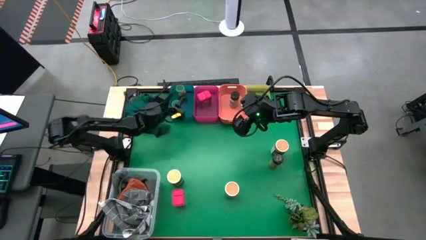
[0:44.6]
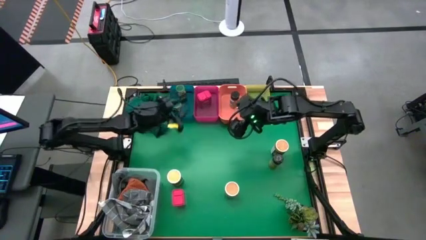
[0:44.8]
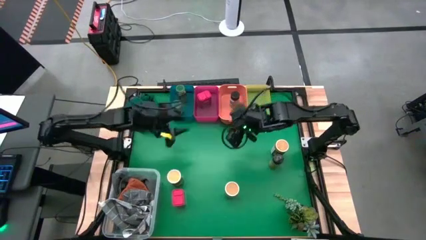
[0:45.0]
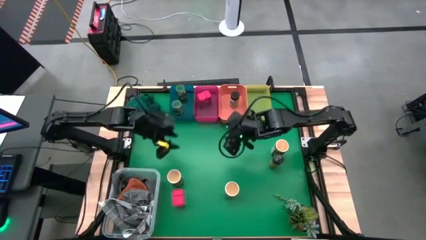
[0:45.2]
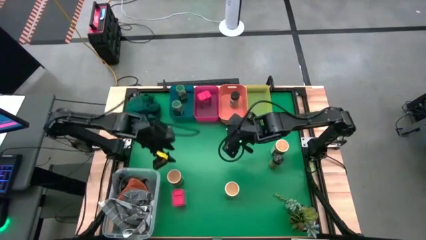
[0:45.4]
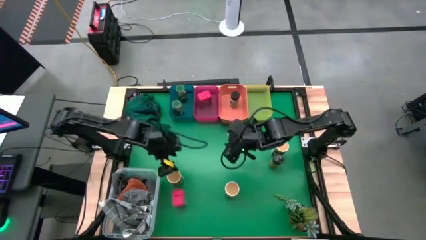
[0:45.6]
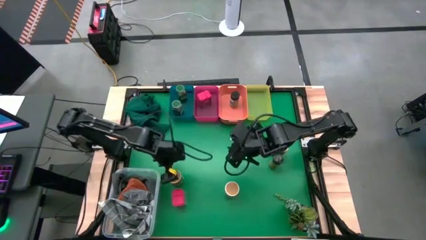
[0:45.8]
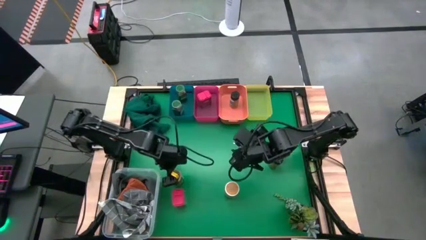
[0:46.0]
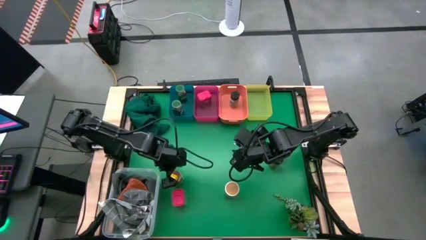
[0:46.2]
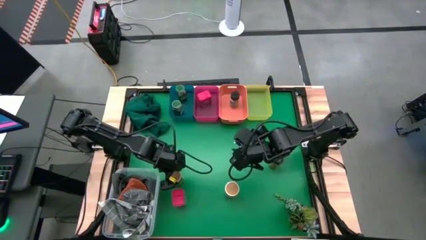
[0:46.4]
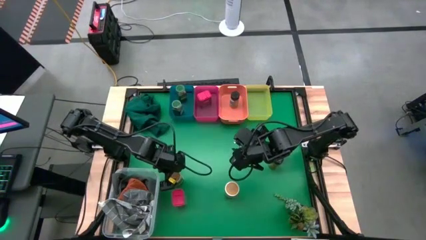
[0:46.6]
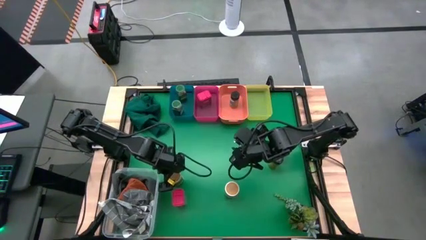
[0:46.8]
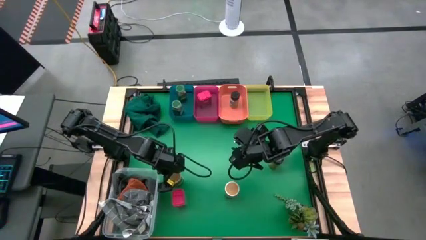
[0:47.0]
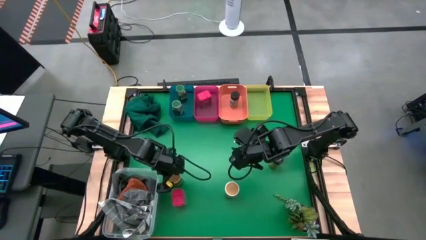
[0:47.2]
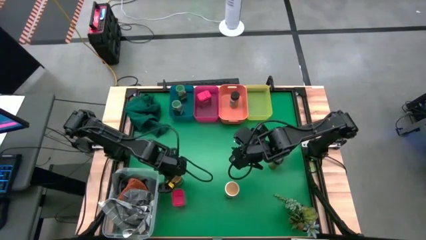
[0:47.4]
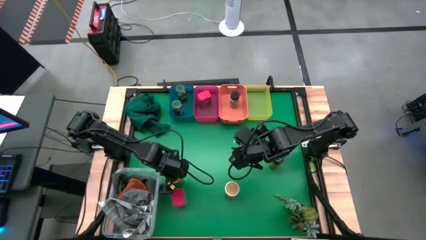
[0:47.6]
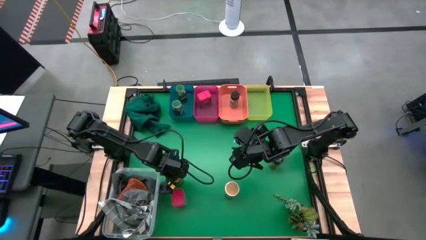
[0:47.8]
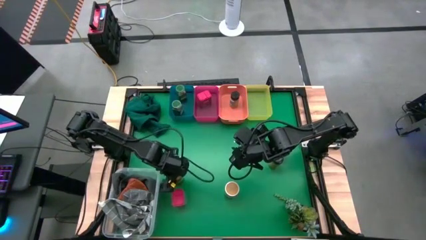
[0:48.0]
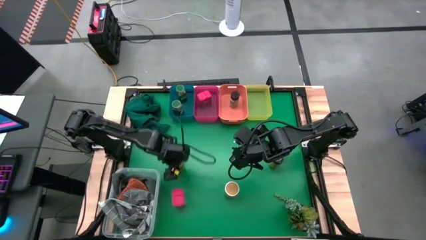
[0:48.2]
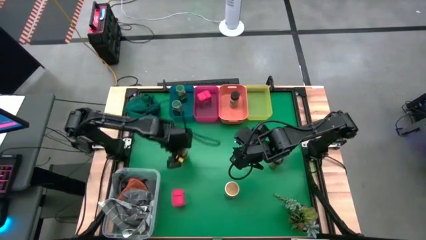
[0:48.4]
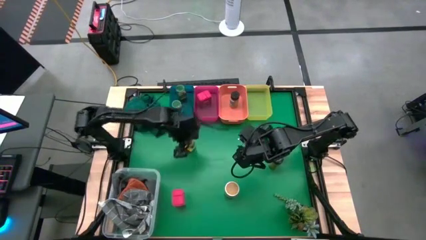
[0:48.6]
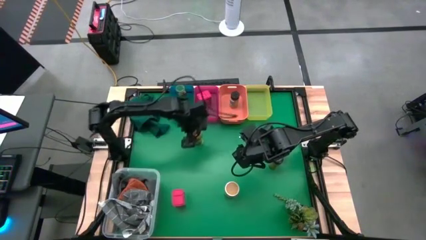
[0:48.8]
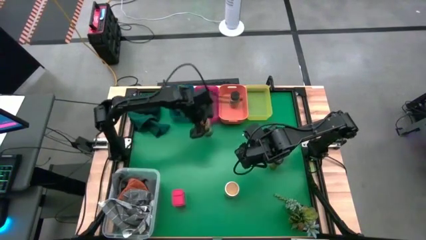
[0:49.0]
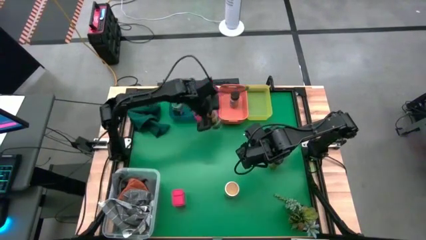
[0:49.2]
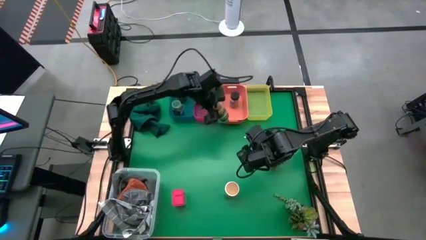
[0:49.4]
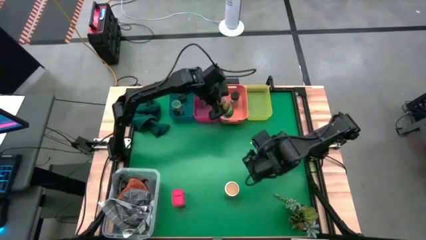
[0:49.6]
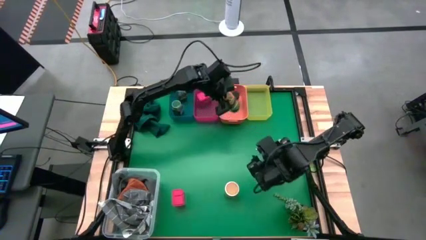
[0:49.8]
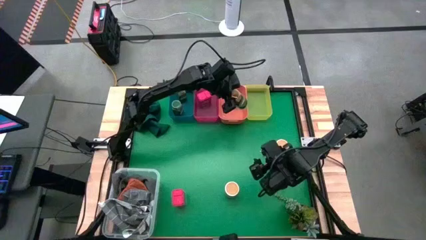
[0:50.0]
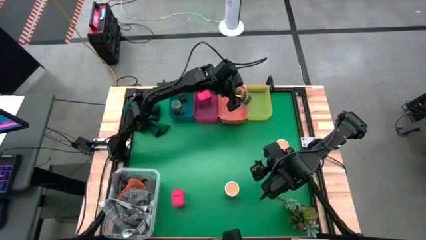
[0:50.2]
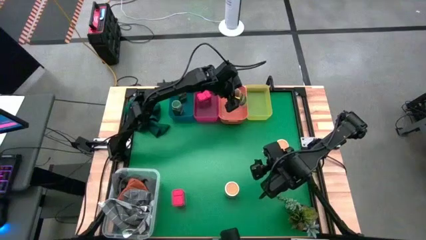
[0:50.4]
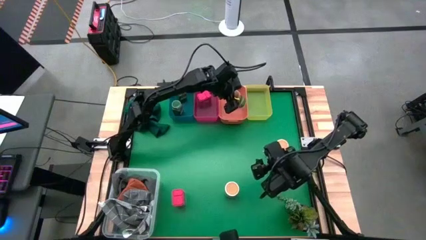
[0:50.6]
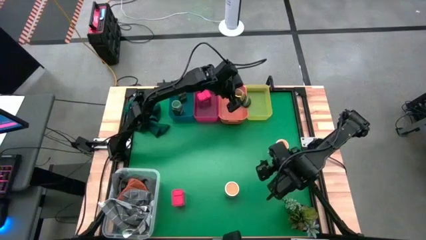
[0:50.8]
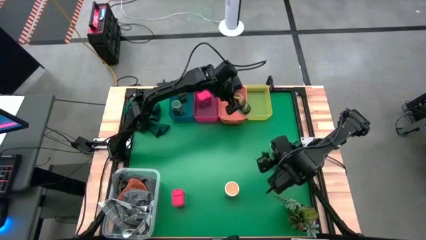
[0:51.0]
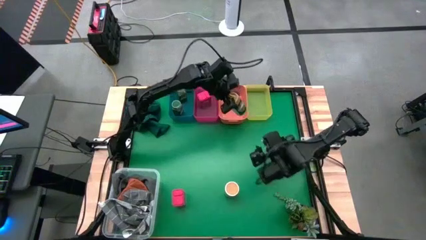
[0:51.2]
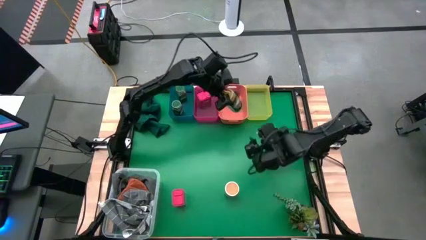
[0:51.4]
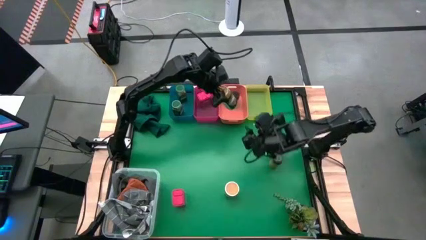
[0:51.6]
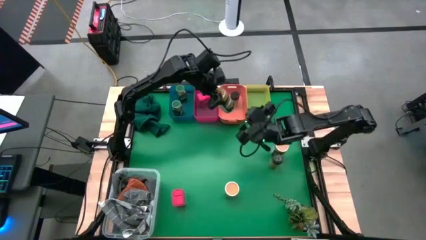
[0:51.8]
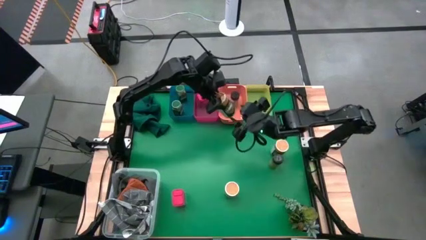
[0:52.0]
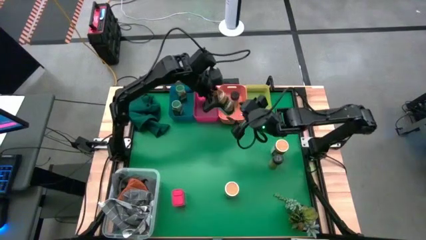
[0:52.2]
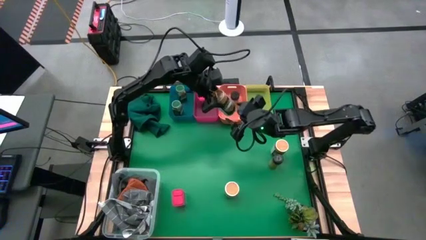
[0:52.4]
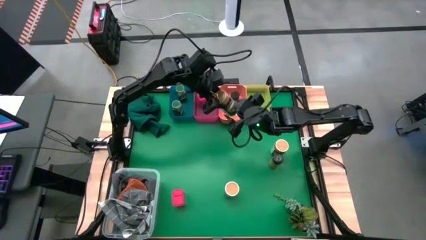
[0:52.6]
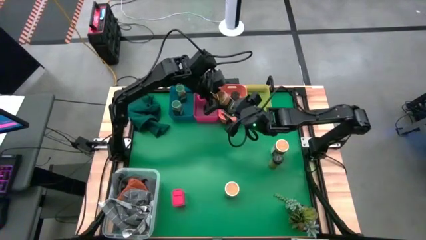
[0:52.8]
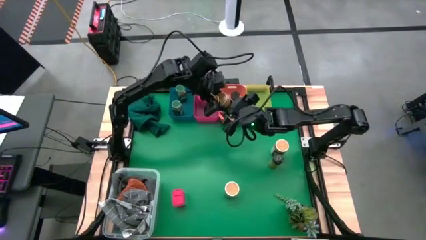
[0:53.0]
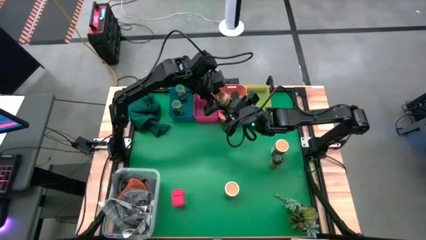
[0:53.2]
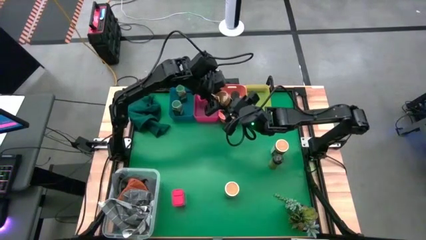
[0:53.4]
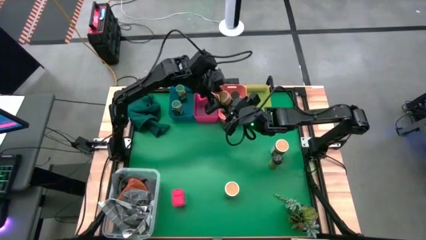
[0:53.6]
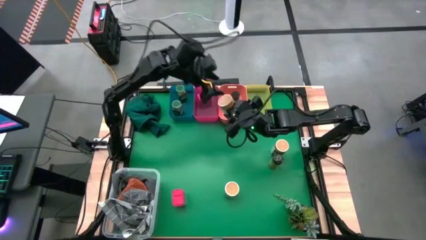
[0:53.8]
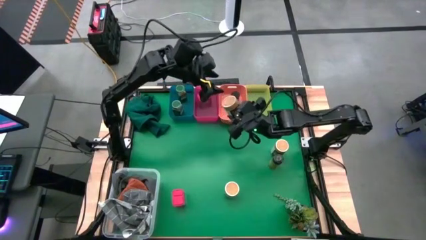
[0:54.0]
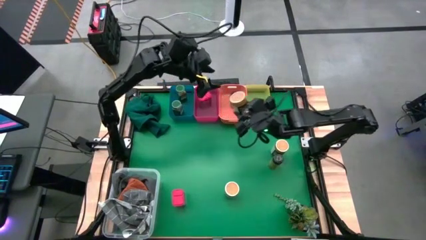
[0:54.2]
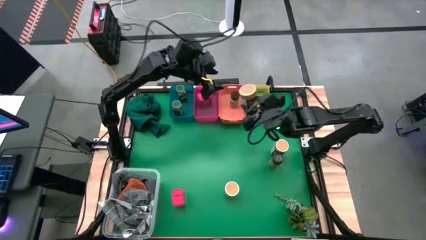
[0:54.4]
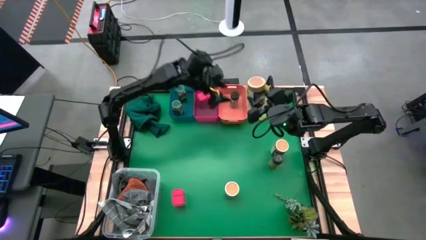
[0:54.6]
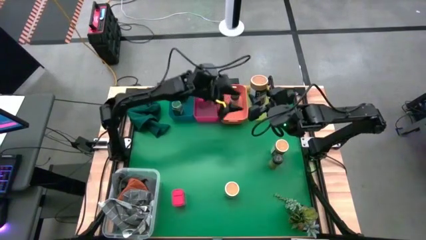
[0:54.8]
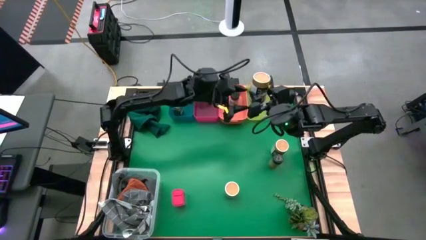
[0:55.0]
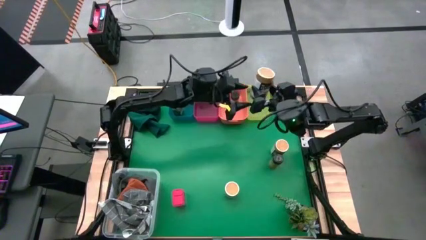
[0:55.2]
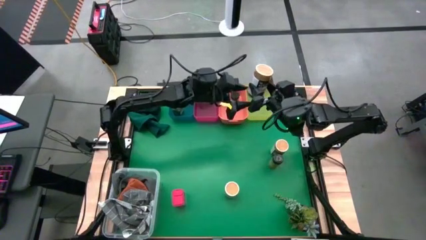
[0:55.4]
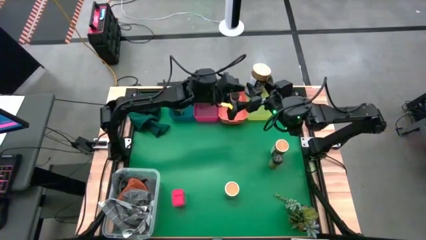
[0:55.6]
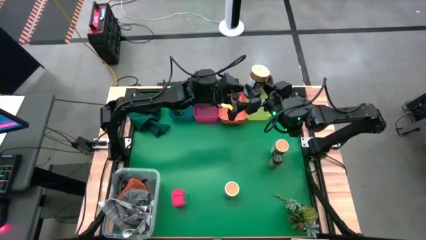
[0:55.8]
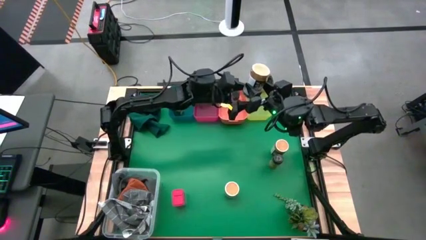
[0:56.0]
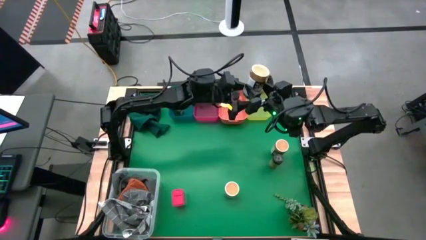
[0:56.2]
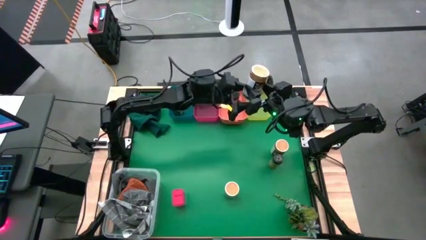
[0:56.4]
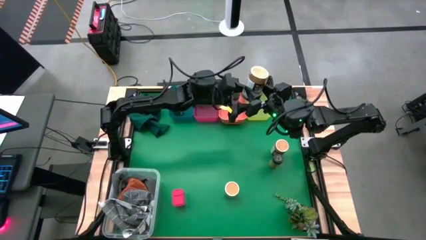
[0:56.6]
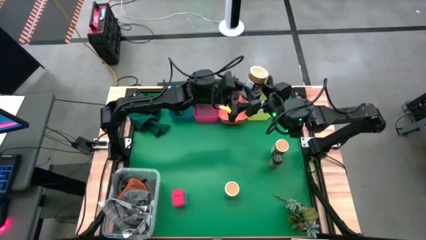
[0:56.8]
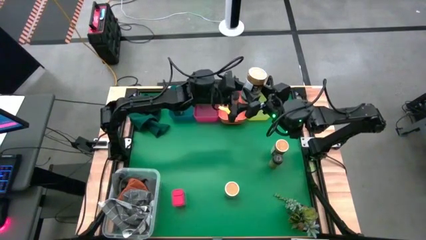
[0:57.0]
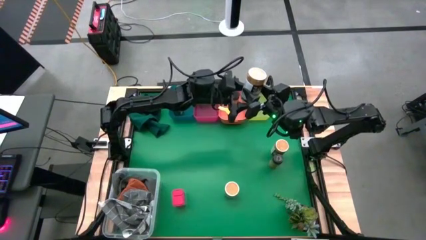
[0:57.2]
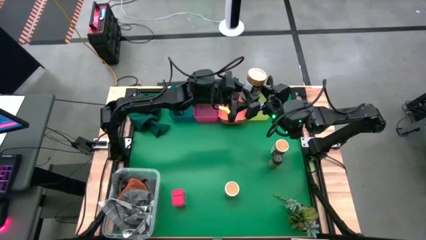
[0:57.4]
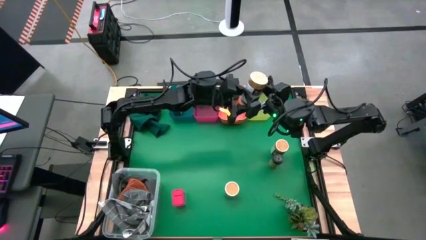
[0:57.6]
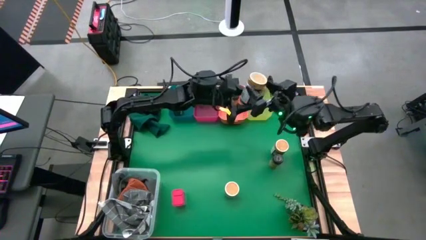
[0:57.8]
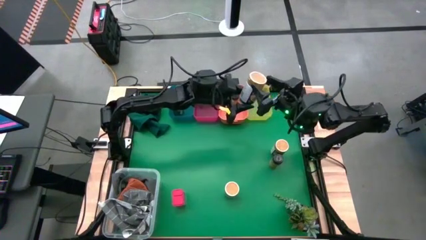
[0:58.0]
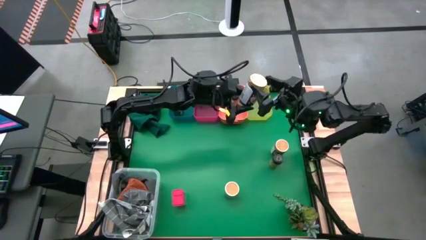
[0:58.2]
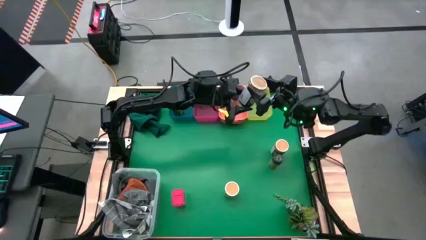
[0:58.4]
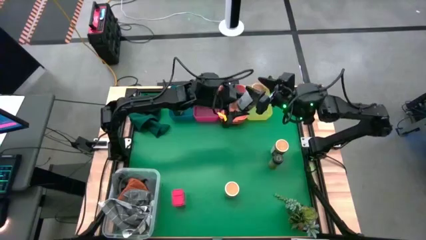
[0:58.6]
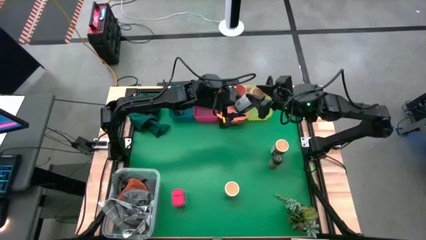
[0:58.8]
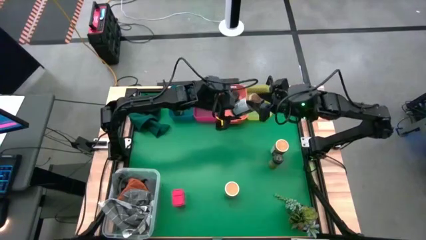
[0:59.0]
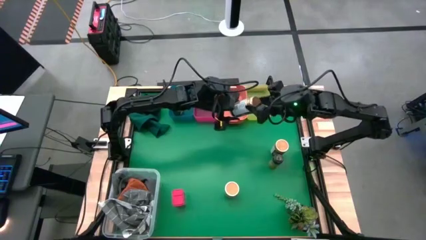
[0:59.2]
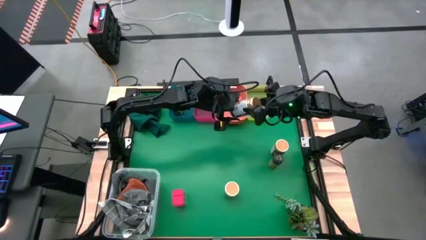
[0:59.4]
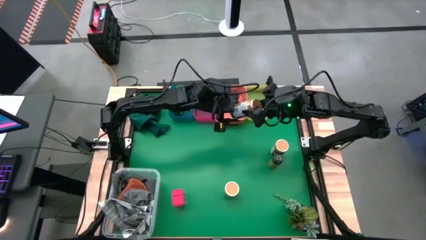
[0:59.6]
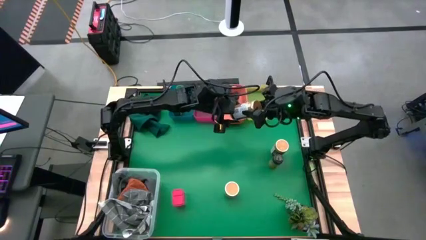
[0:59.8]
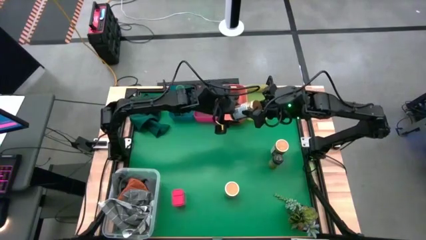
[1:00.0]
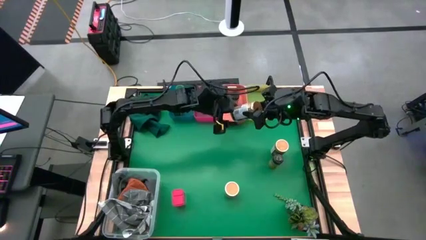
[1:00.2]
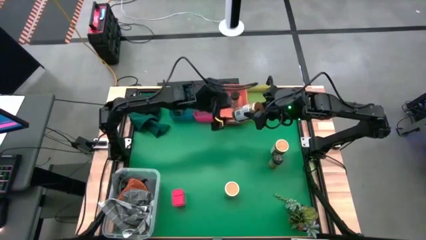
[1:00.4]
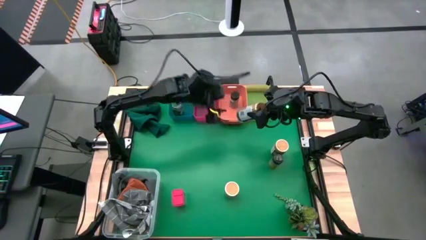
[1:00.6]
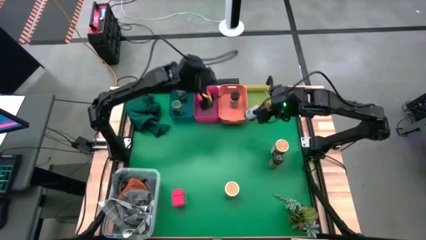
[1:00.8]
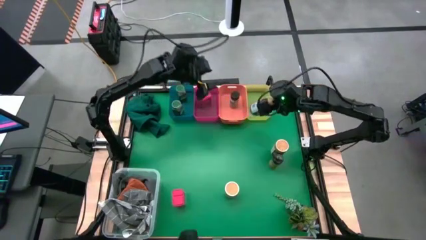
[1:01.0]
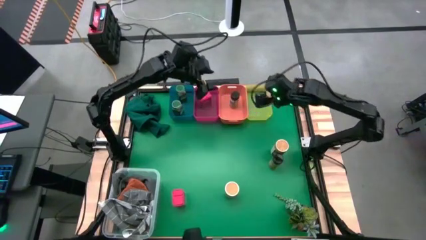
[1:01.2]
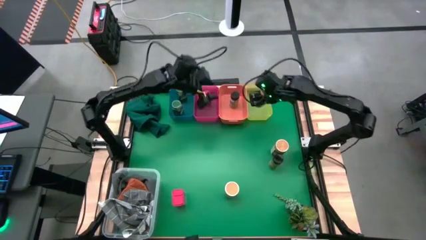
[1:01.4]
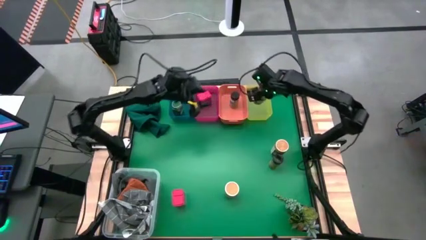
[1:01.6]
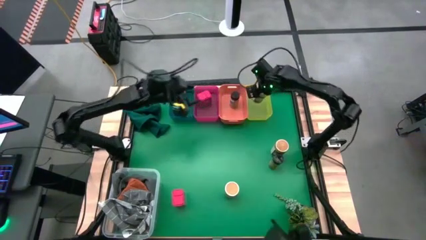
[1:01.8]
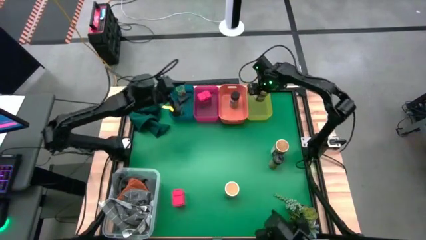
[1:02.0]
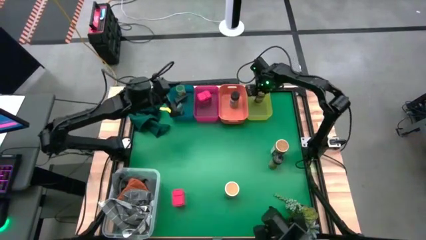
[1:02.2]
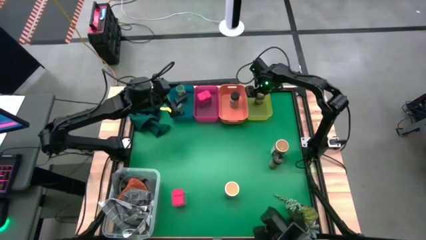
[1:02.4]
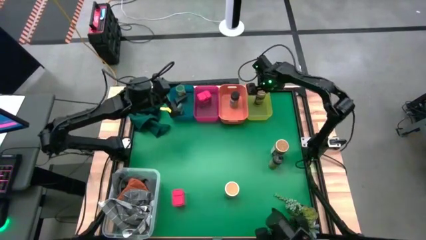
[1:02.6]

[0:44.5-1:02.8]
Task: Sort spices by type
Put the left gold spice bottle into the yellow bin
